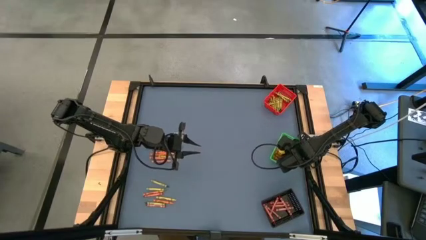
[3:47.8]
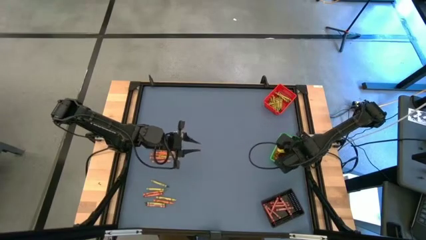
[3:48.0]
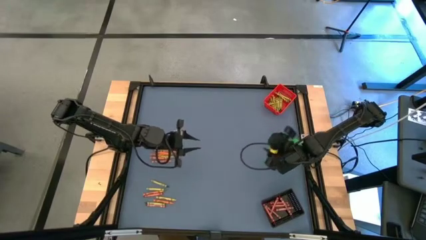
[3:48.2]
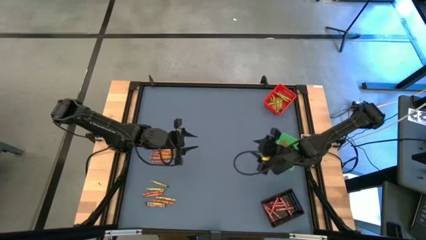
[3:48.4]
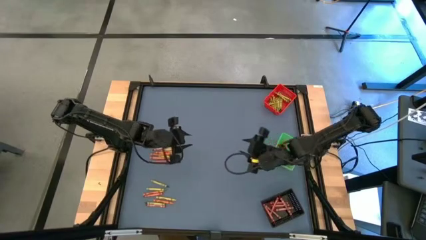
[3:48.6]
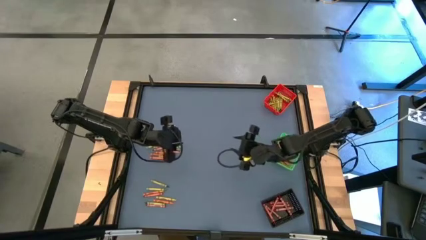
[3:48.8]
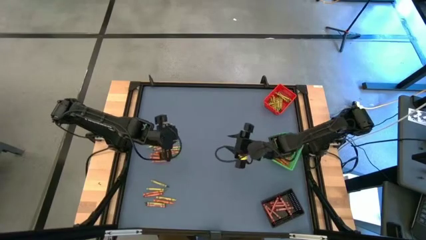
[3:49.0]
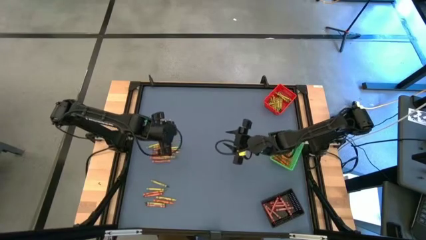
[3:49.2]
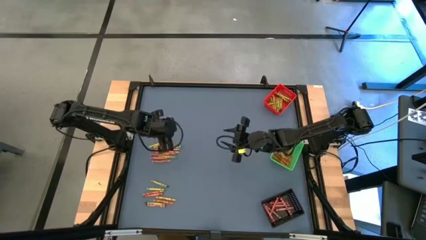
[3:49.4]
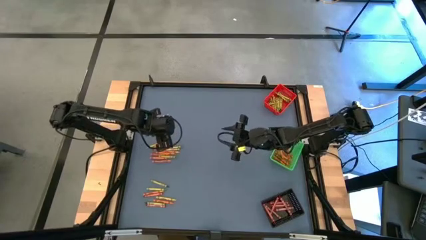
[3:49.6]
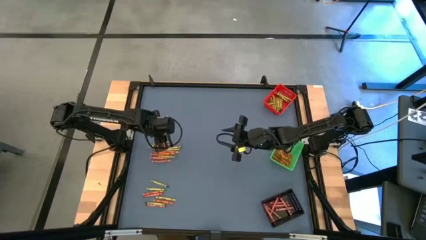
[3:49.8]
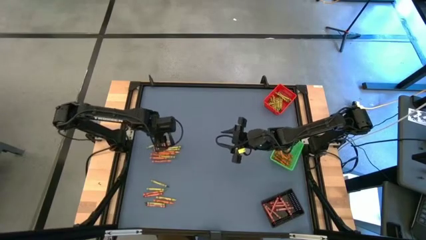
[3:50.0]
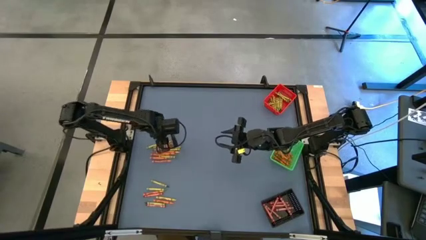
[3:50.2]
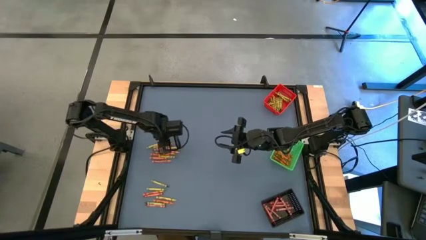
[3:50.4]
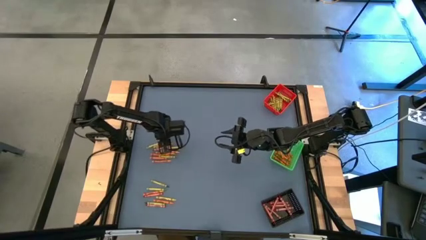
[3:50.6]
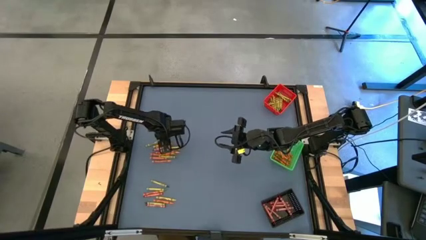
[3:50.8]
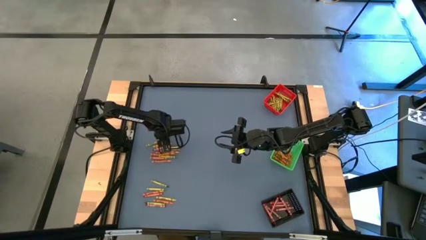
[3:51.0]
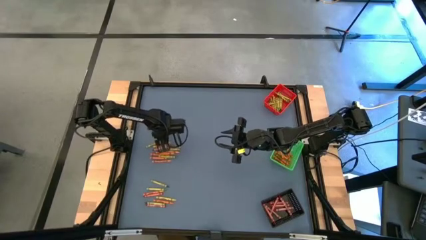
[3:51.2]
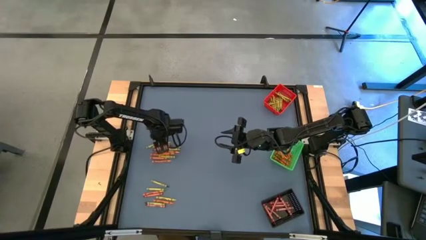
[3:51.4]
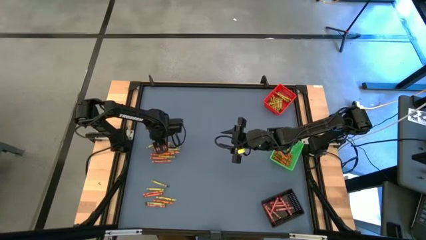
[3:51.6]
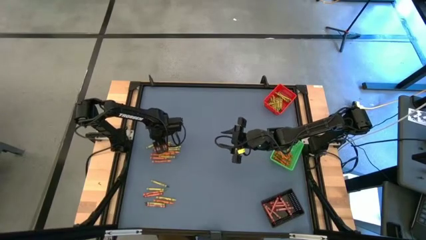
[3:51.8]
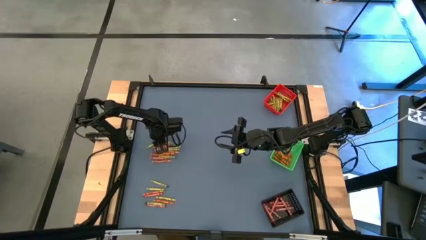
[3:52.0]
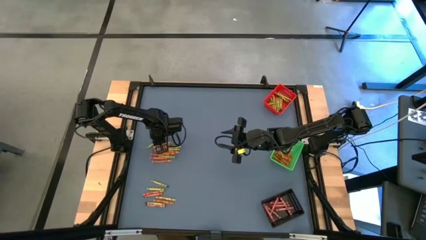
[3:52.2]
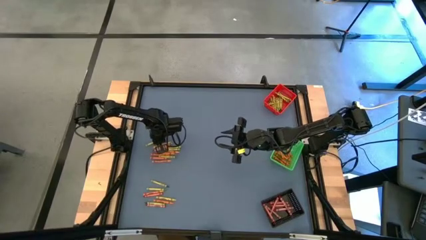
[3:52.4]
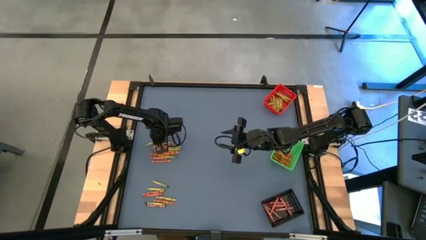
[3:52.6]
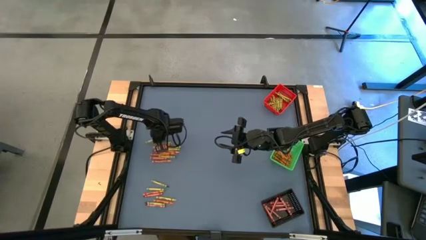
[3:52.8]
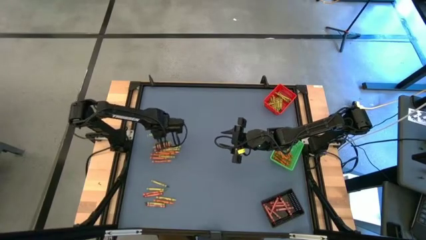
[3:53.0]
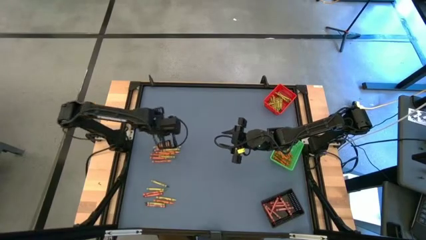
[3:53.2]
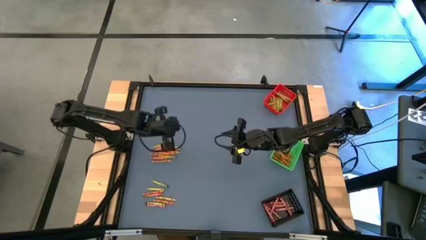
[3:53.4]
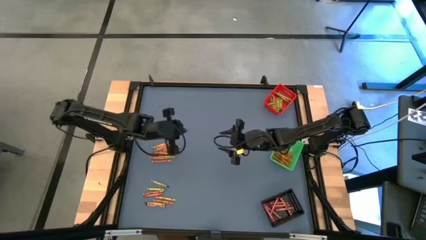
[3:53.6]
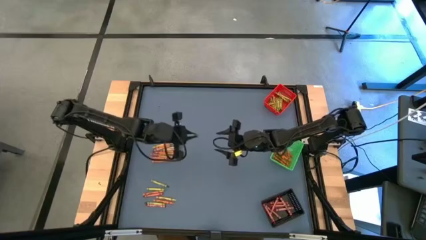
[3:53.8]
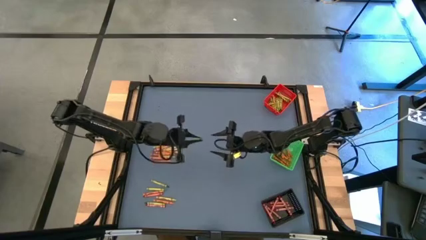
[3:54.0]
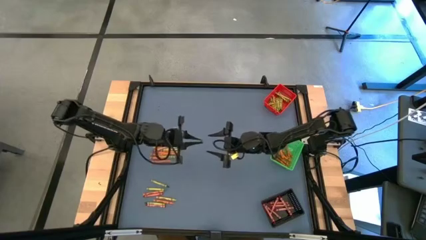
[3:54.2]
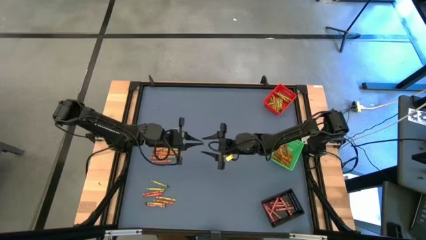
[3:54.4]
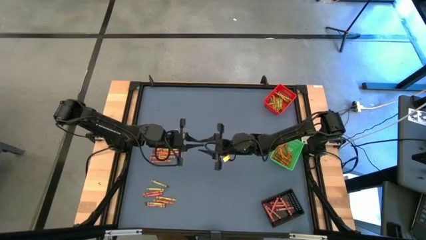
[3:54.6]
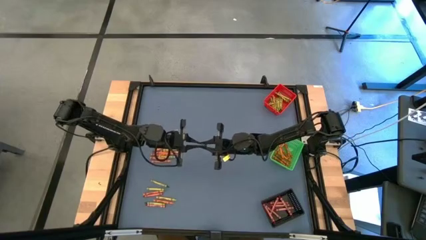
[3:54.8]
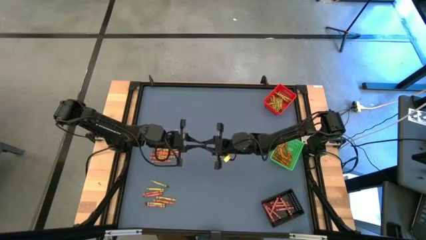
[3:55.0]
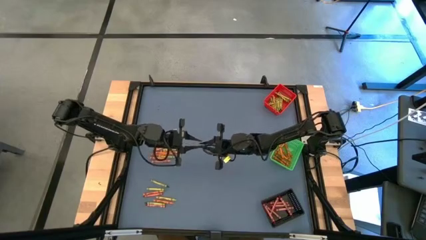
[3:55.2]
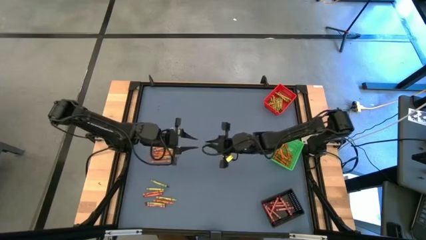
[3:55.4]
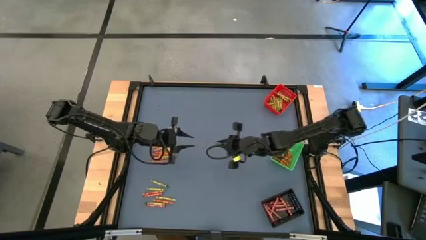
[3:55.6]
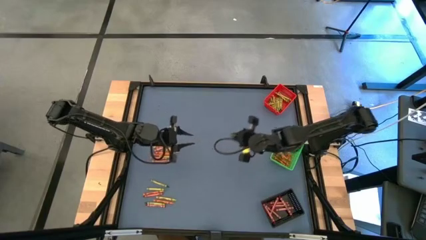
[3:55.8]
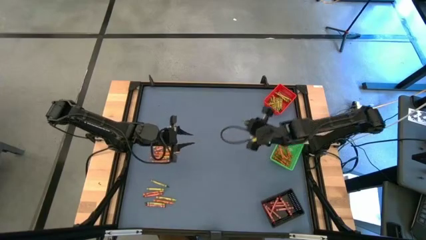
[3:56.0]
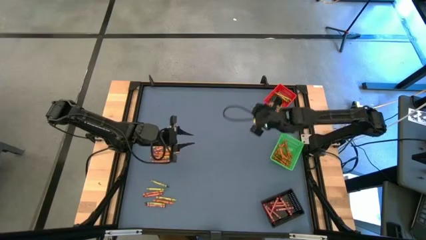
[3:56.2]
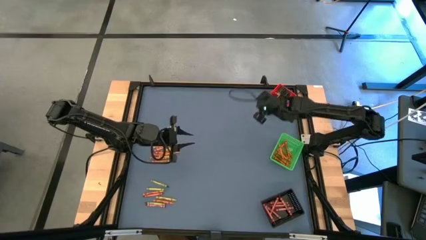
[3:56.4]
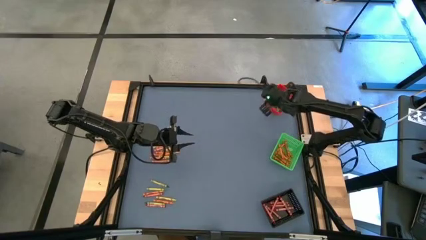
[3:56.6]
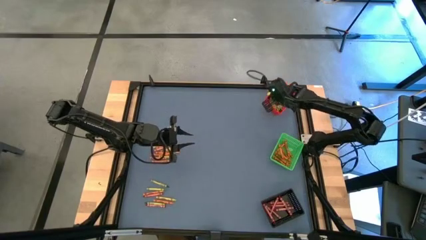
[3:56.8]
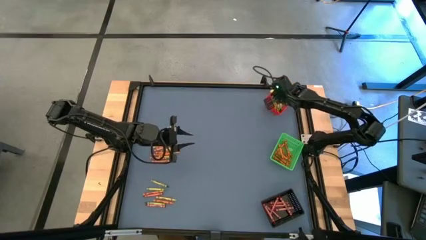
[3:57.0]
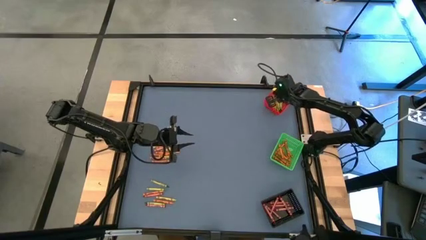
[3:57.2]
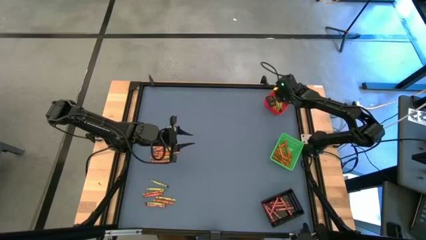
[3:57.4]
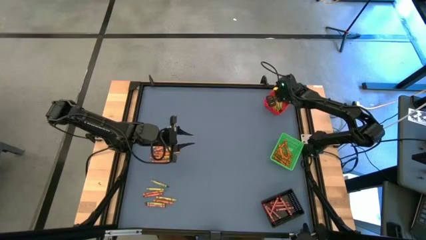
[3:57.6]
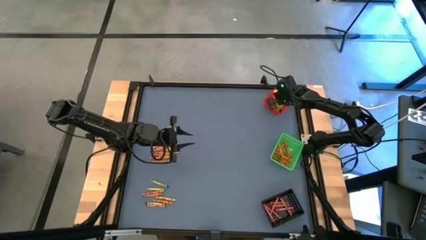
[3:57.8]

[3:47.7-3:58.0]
Task: Sort crayons
Put the green crayon into the red bin

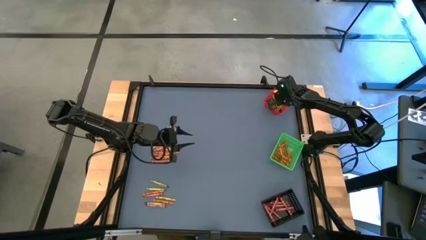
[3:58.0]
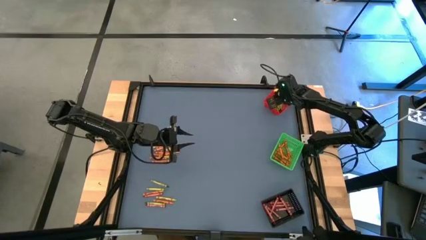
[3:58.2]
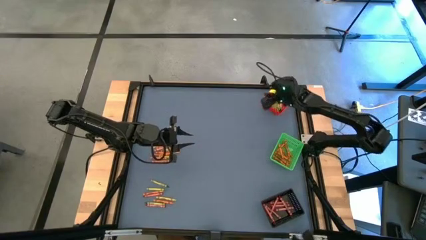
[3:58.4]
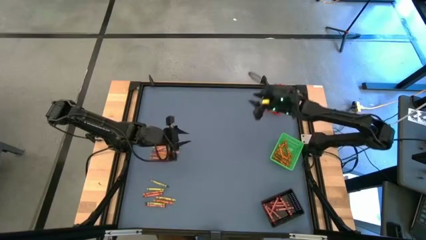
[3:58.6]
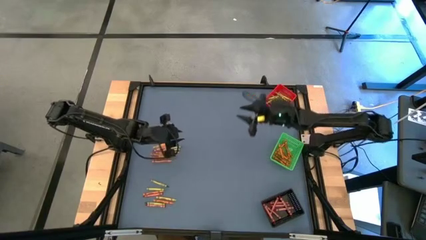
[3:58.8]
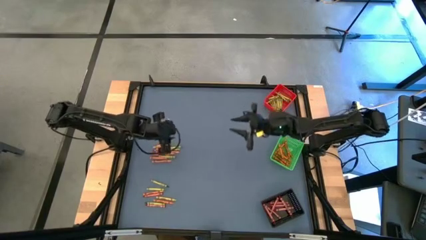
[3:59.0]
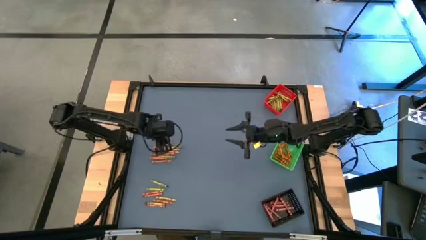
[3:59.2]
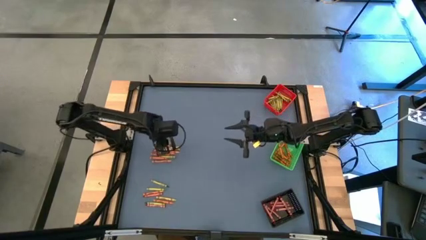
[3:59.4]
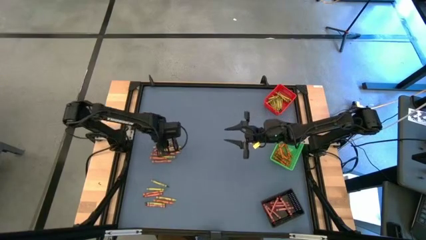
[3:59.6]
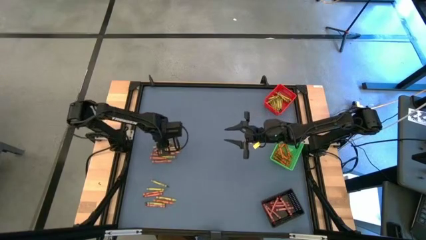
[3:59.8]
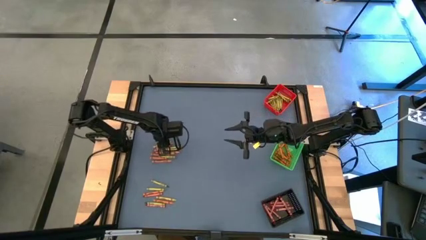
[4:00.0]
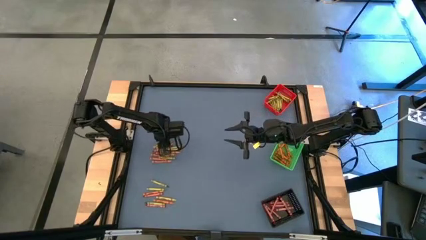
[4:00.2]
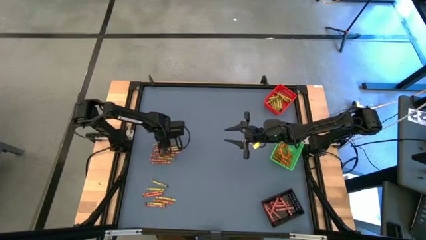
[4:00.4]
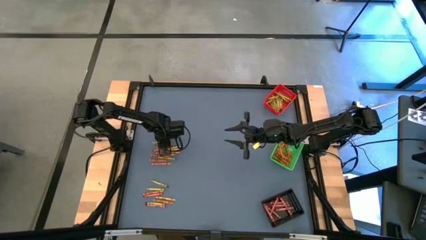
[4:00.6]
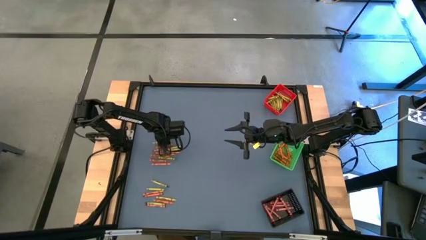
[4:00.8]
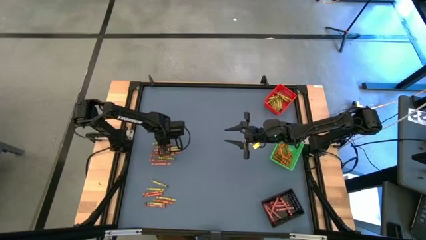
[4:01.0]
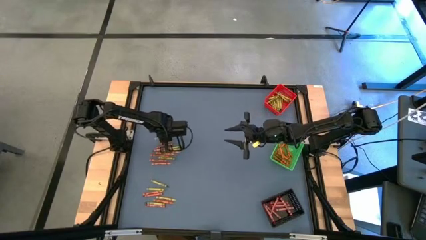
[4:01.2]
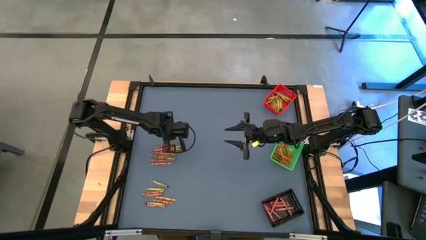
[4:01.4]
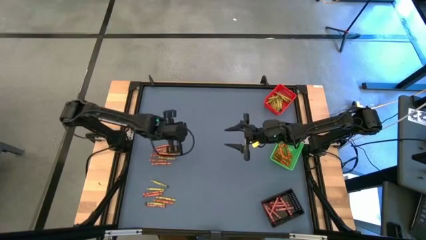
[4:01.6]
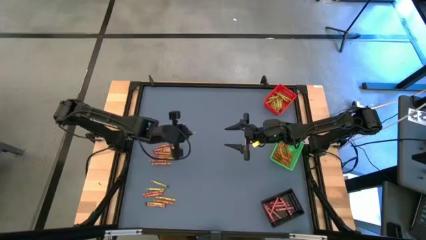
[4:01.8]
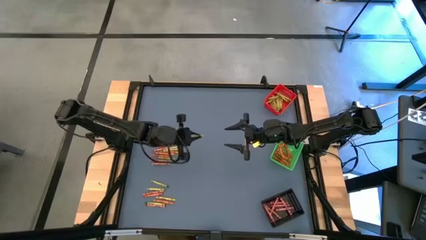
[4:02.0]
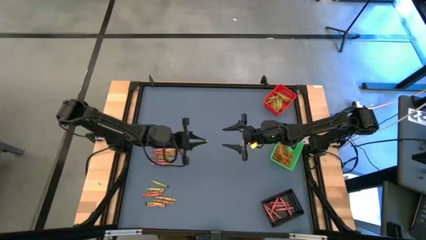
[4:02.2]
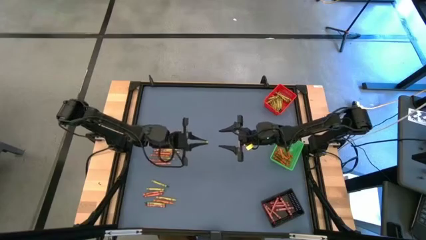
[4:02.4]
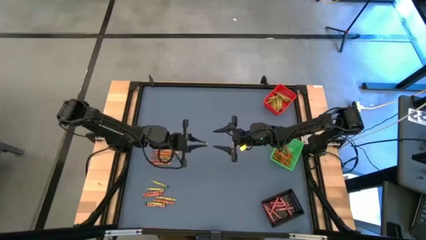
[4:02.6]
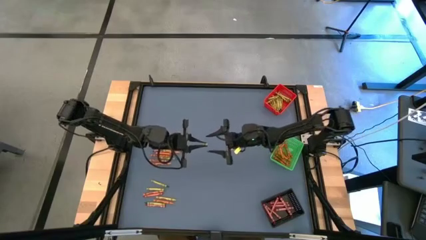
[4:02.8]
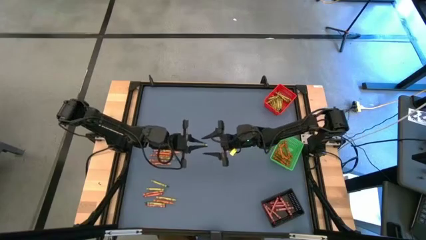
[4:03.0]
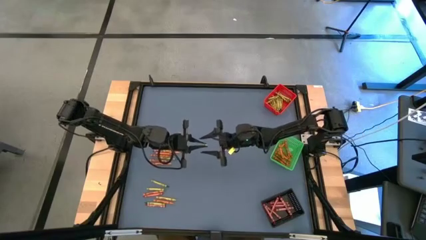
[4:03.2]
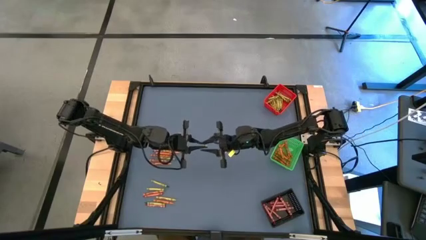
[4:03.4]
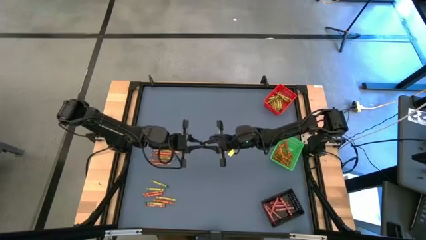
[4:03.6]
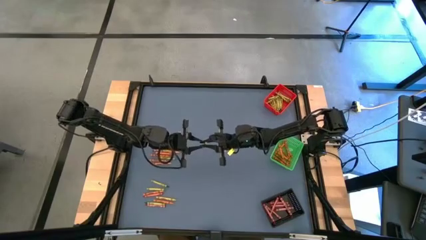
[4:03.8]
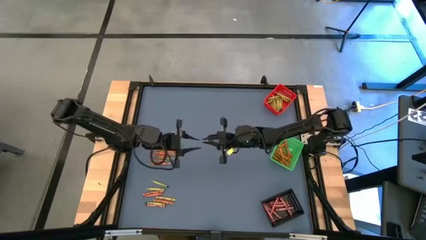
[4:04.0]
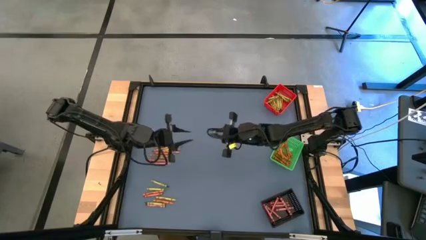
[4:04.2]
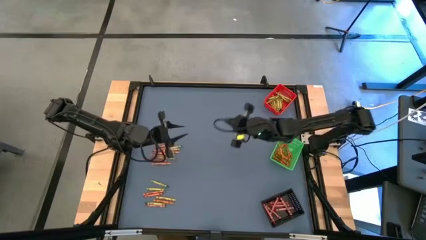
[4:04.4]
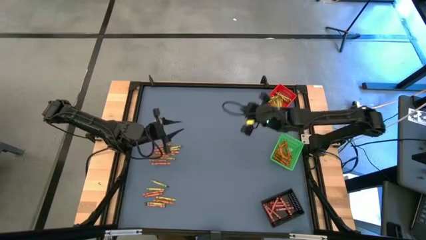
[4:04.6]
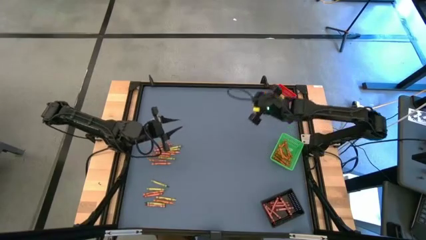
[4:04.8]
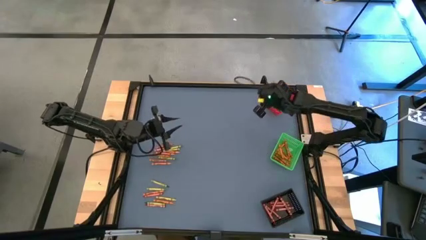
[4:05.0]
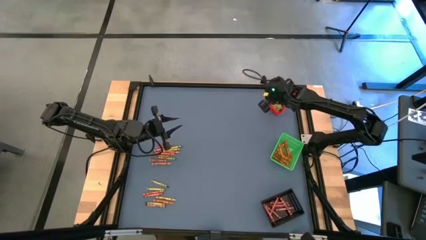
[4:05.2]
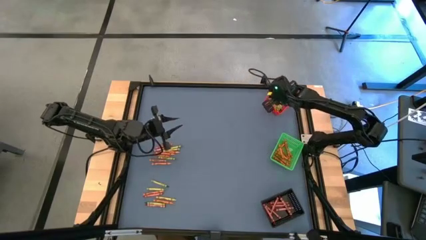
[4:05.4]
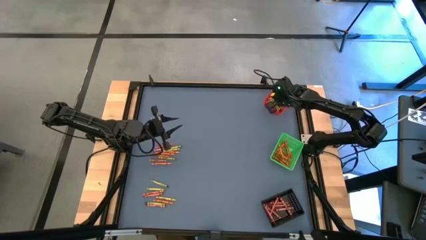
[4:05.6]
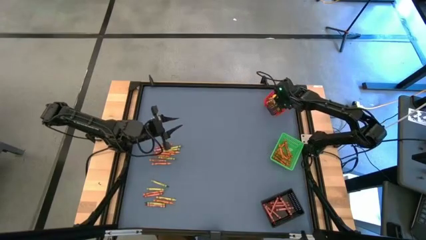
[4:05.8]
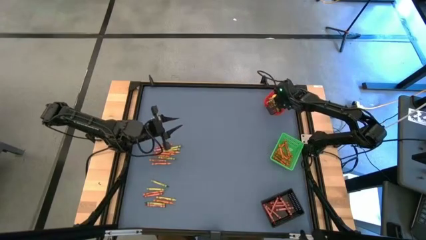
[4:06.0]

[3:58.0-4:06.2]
Put the light green crayon into the red bin
